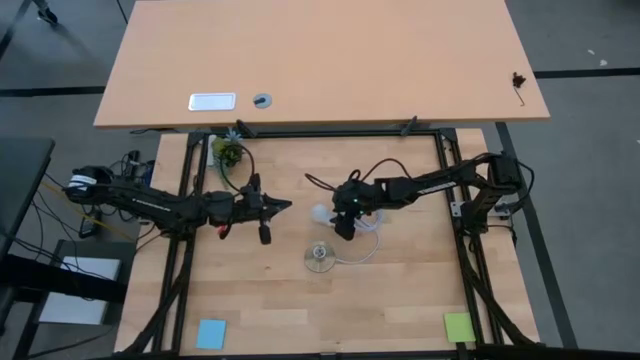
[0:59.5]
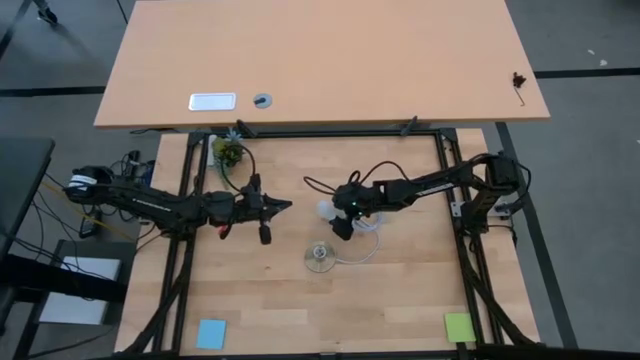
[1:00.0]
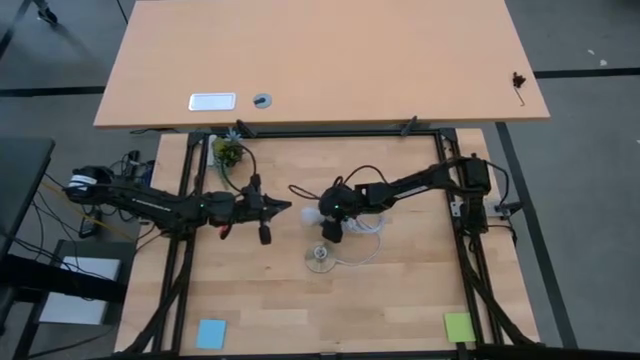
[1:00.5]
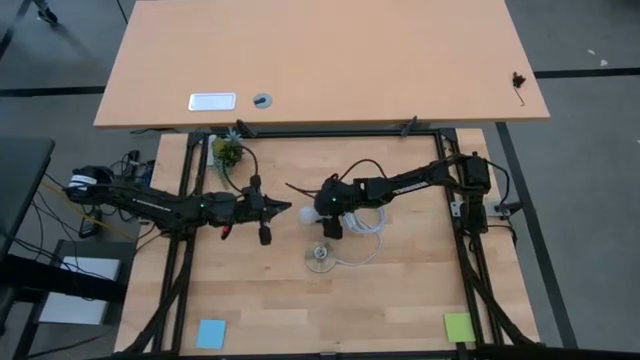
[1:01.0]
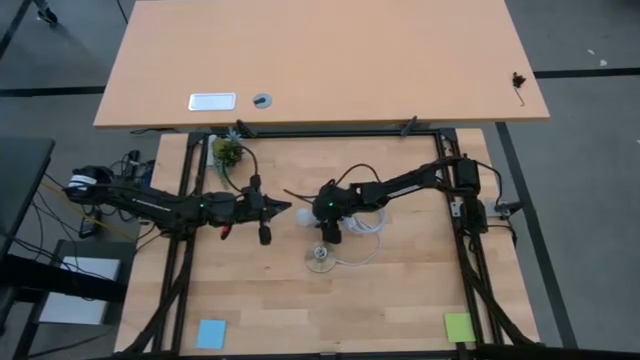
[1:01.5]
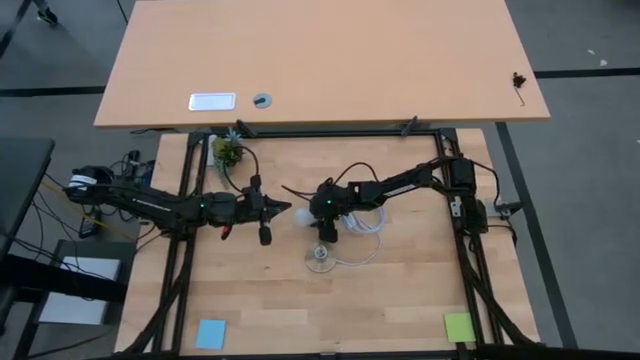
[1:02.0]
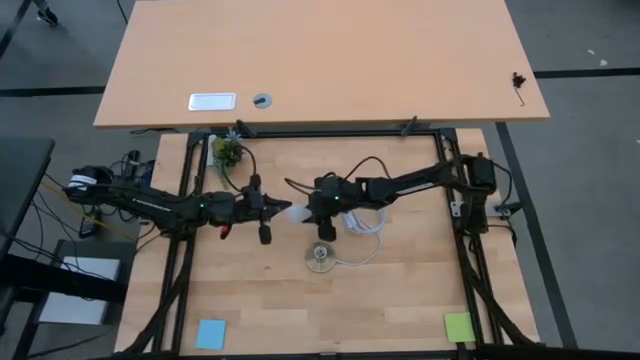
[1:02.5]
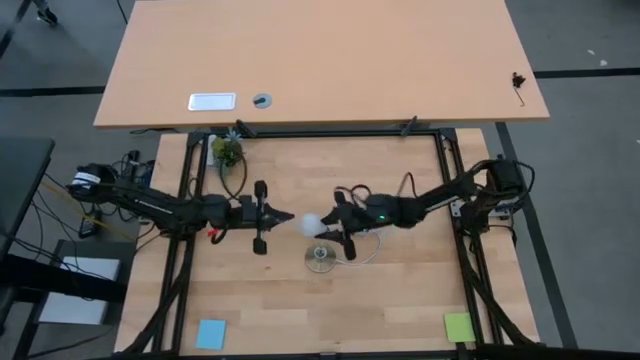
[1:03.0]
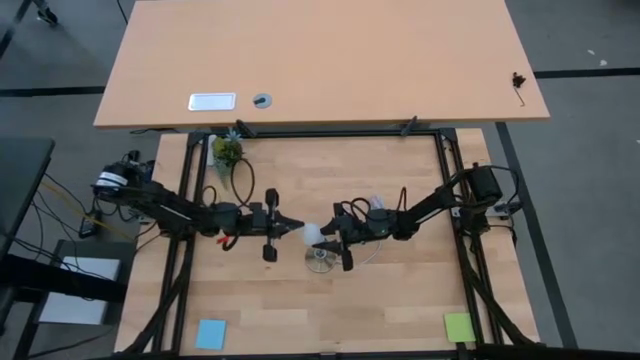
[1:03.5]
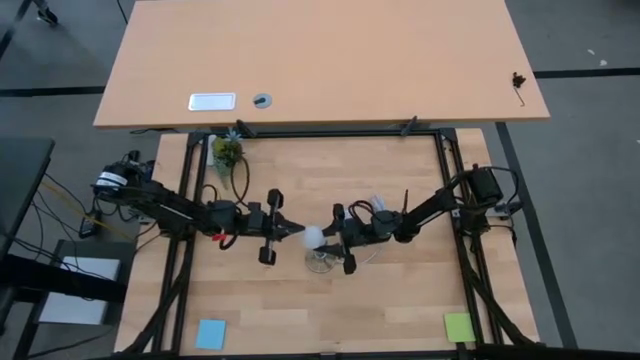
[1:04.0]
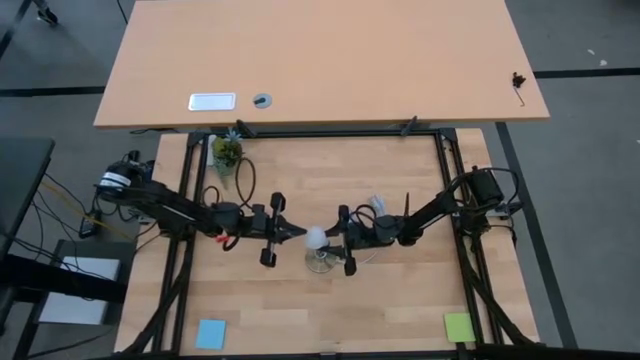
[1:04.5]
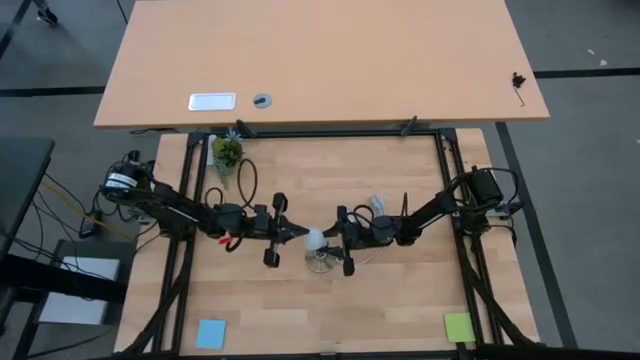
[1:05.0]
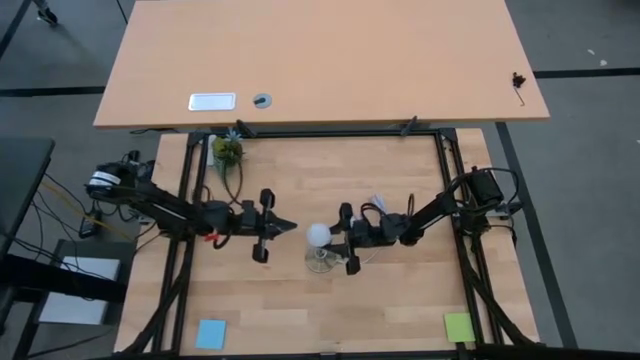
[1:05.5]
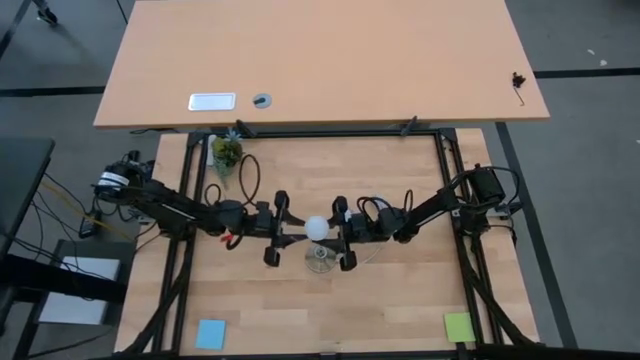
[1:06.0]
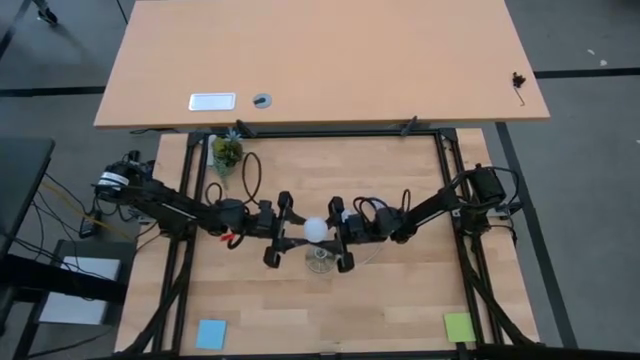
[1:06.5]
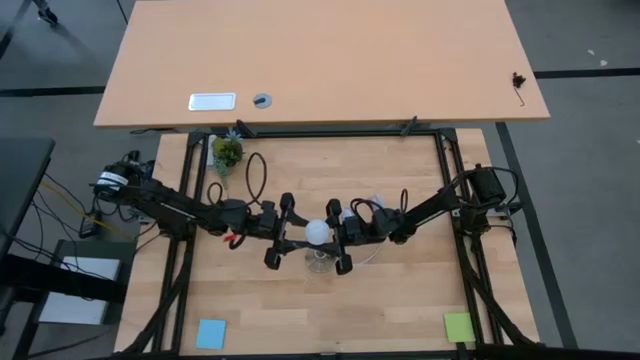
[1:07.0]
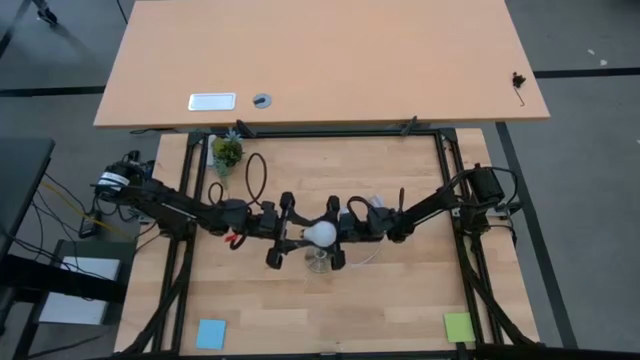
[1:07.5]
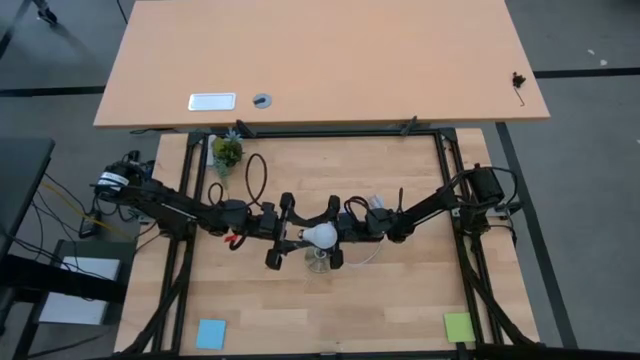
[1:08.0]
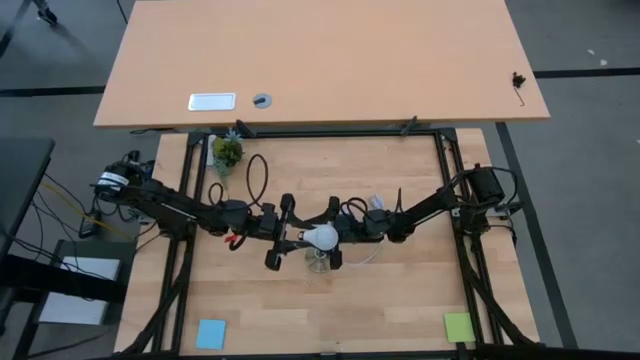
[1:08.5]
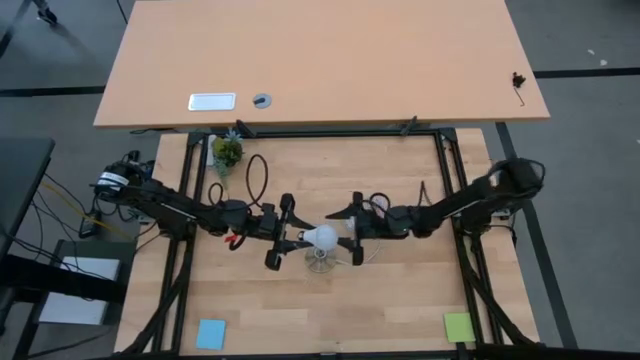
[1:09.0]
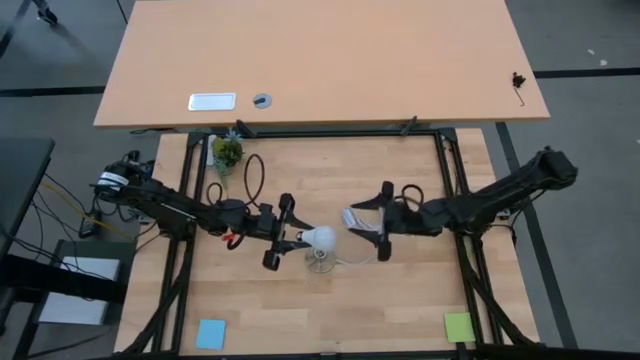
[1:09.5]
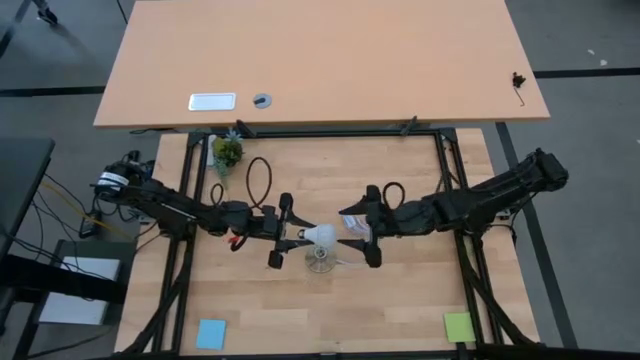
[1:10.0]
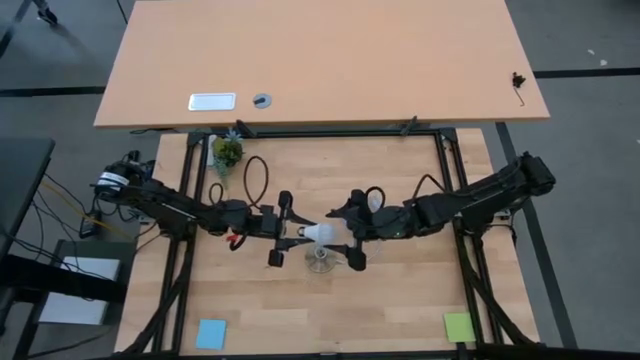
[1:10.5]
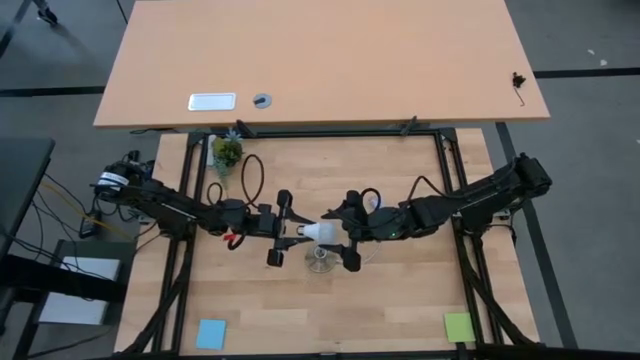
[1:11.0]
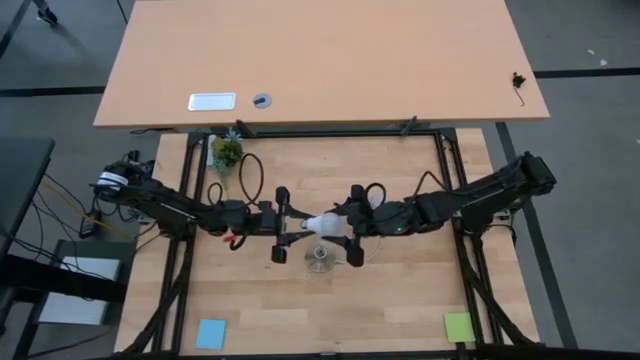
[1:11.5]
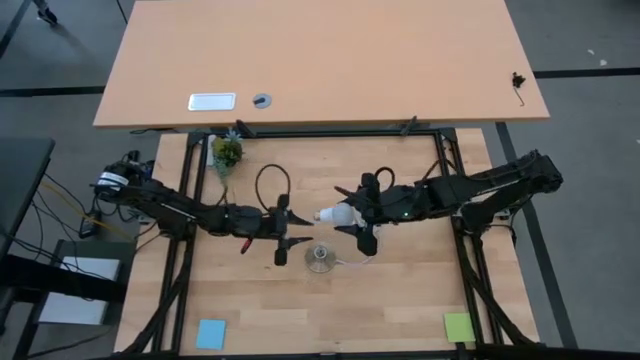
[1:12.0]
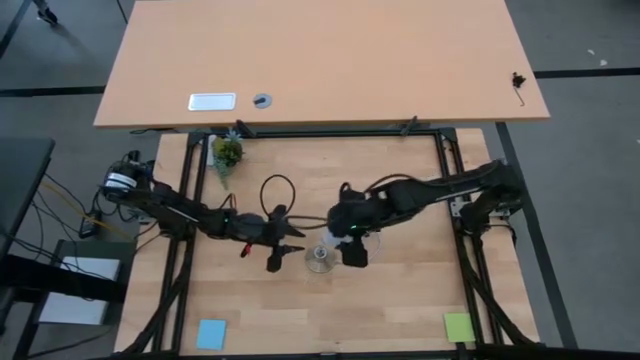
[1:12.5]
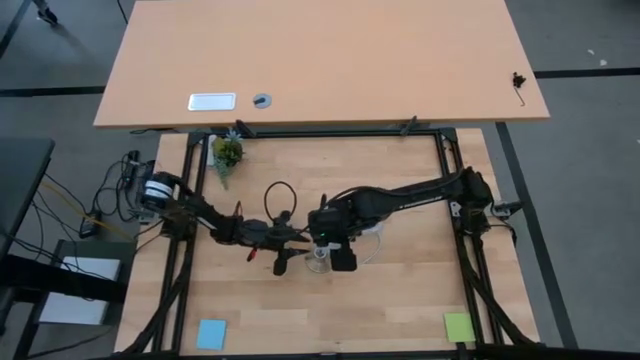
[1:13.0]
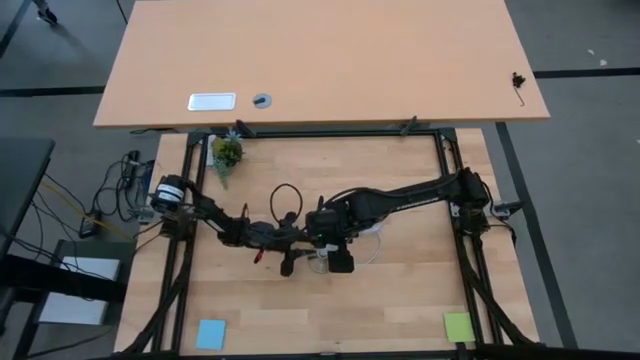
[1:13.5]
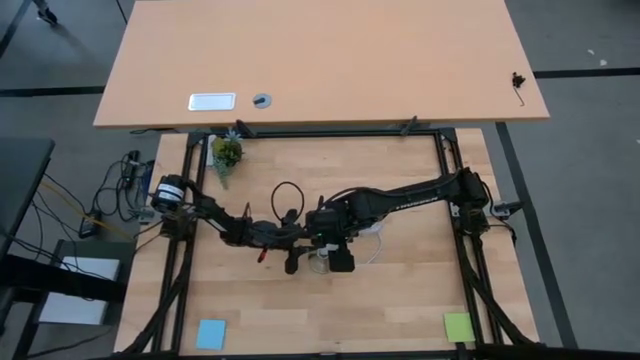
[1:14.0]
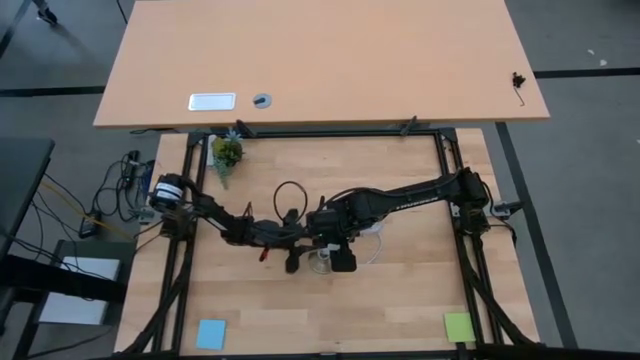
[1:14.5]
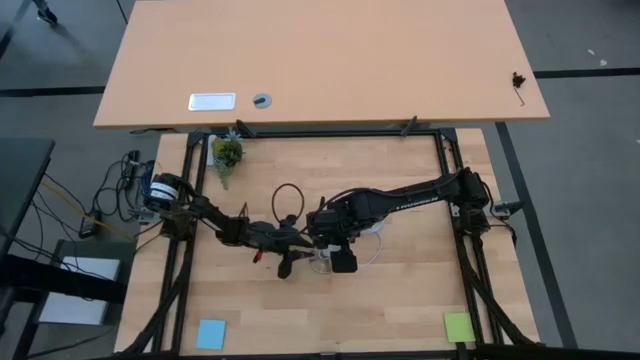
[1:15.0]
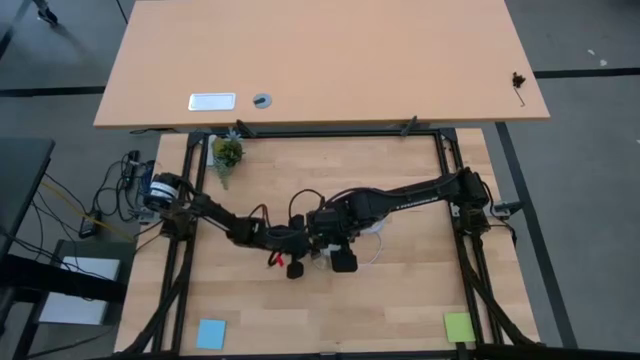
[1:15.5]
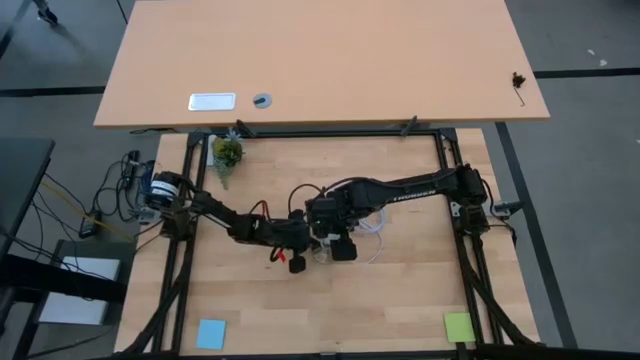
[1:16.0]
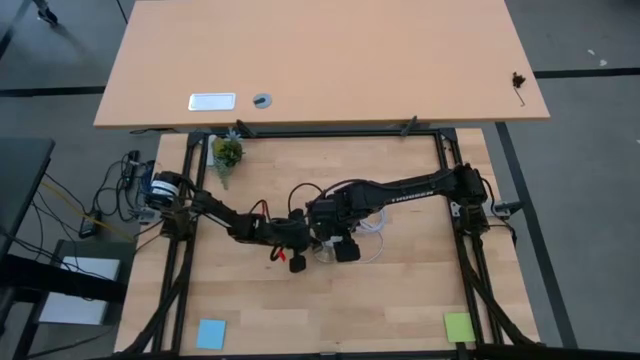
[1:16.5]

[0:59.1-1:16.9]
Task: Screw lightbulb
Insert the lightbulb into the lamp socket

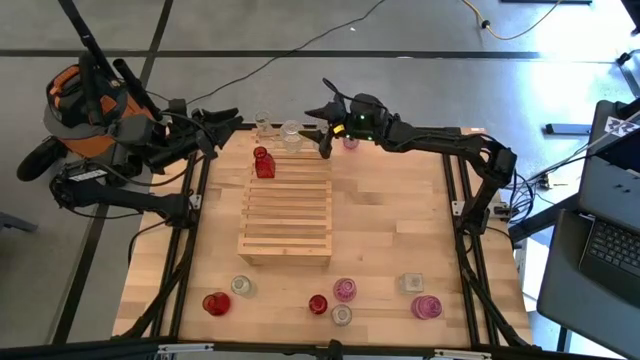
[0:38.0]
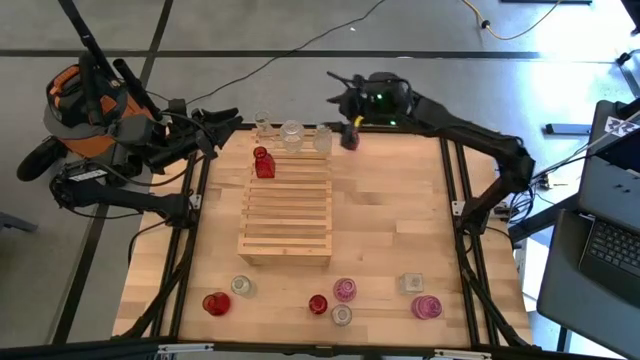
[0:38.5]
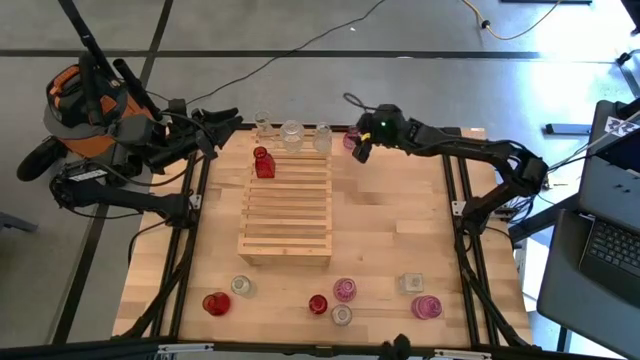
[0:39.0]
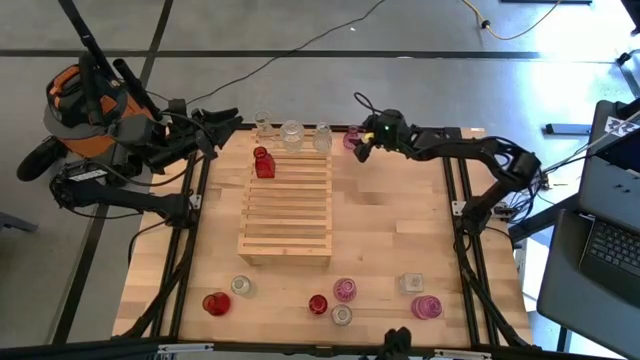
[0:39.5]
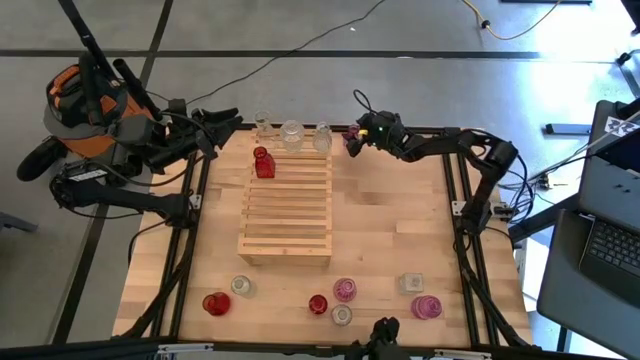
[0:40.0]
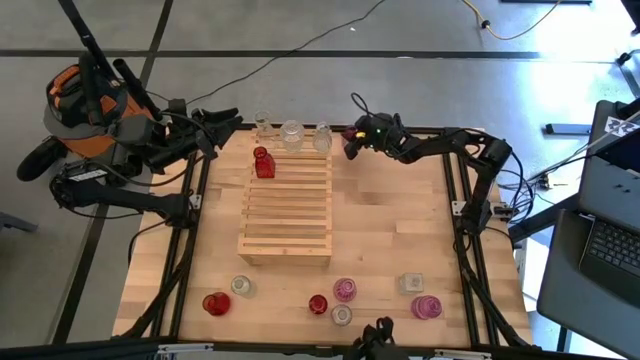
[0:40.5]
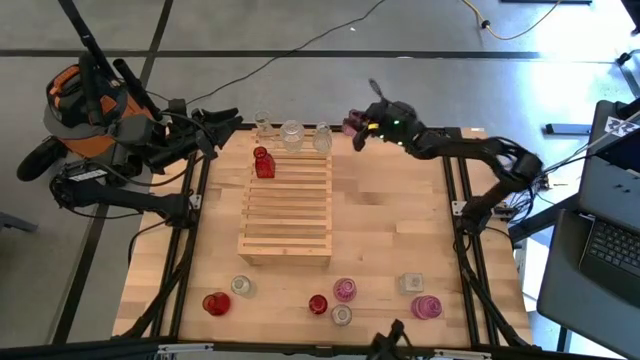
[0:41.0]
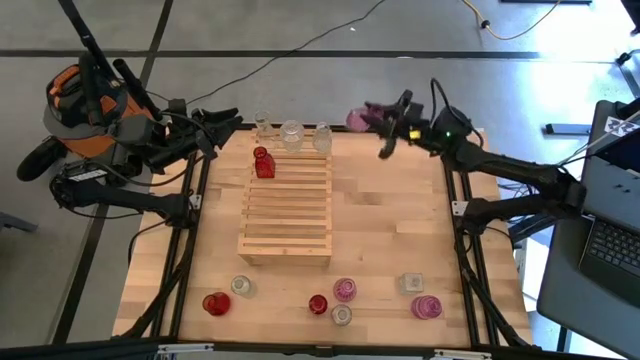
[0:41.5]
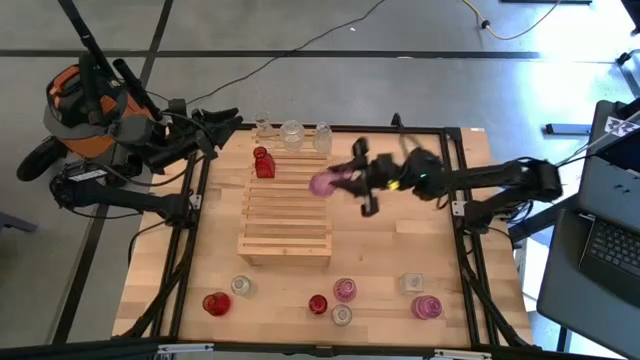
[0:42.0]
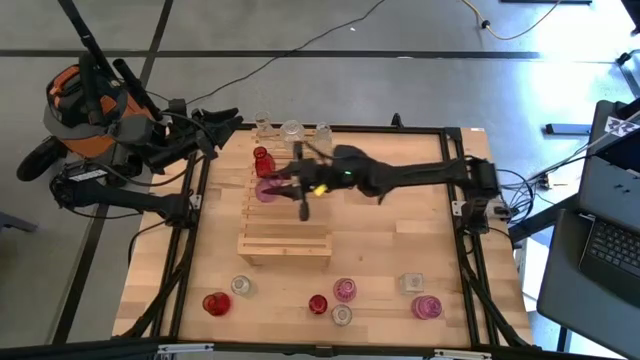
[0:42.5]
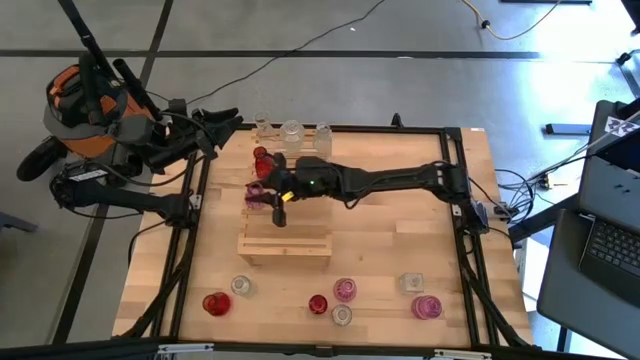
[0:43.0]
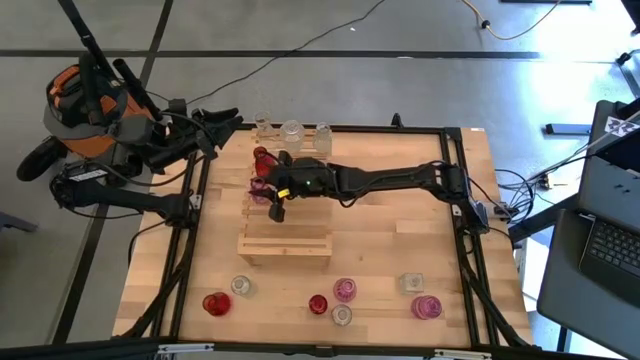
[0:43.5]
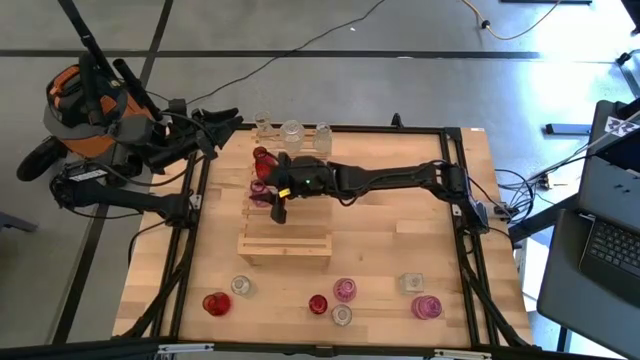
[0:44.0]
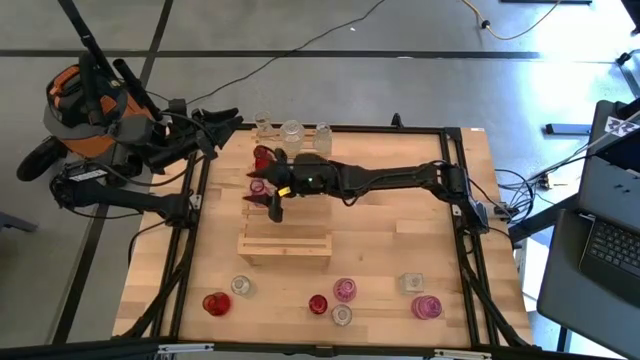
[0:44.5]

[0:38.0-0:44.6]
Task: sort vases onto shelf
Put the pink vase into the shelf
